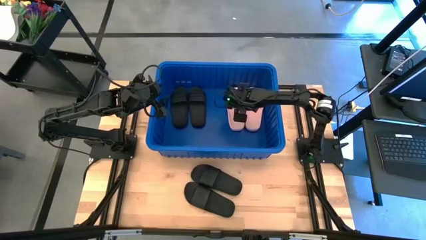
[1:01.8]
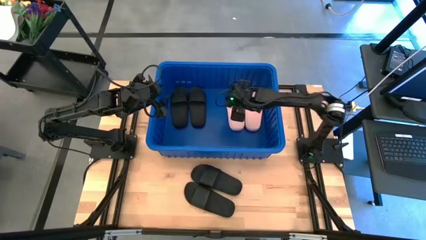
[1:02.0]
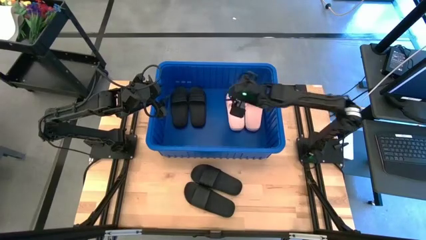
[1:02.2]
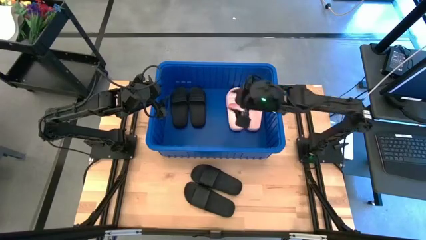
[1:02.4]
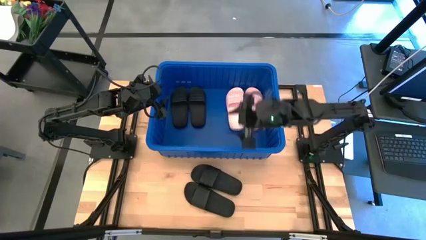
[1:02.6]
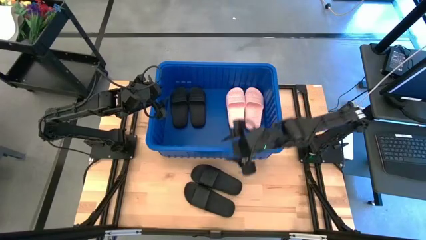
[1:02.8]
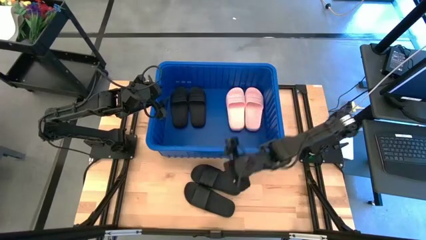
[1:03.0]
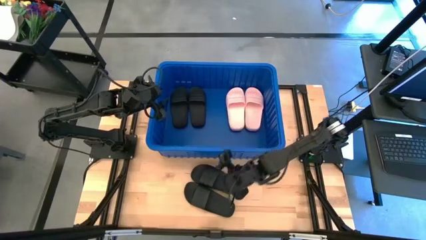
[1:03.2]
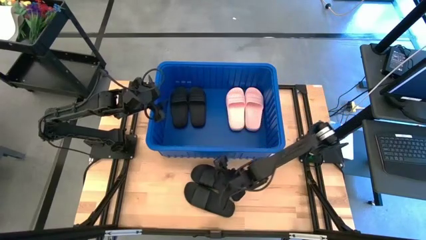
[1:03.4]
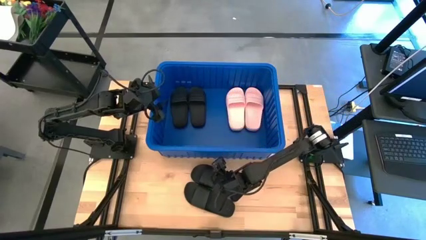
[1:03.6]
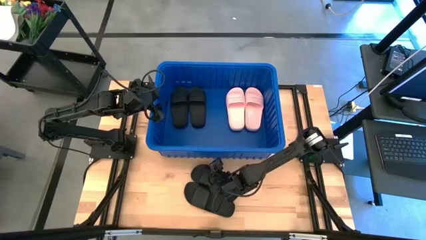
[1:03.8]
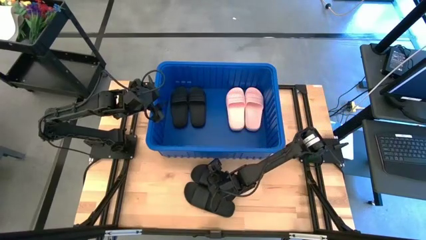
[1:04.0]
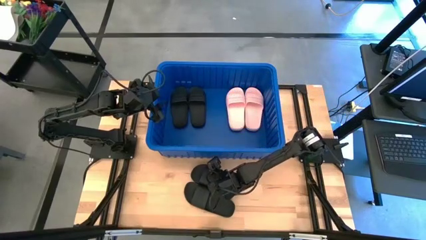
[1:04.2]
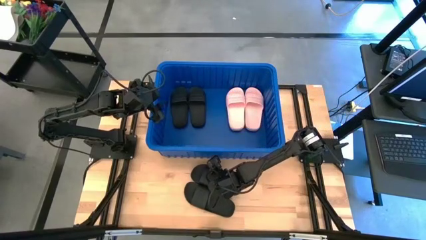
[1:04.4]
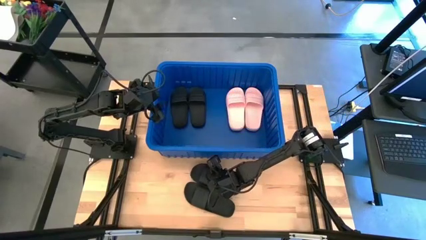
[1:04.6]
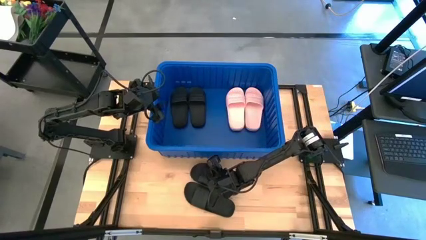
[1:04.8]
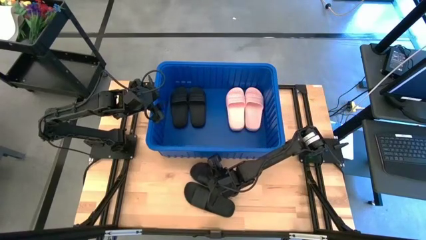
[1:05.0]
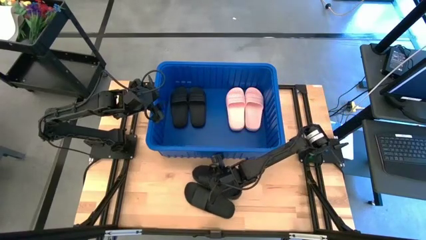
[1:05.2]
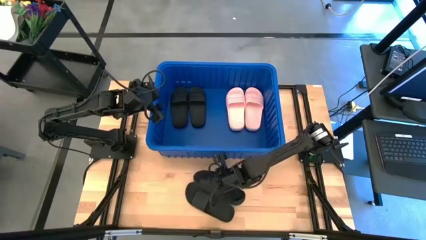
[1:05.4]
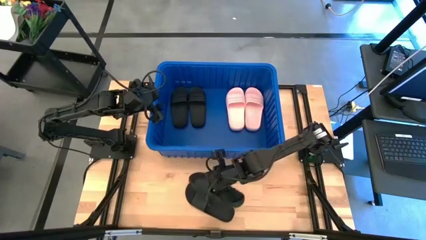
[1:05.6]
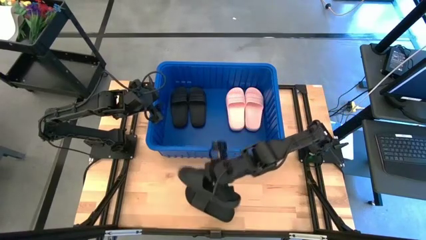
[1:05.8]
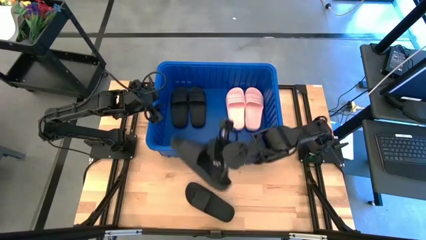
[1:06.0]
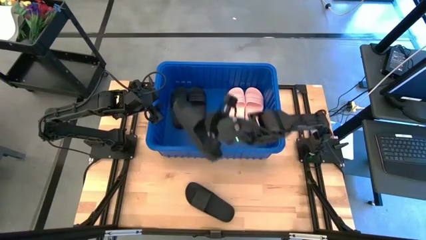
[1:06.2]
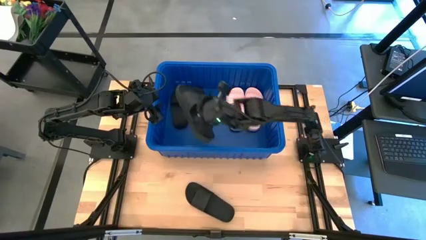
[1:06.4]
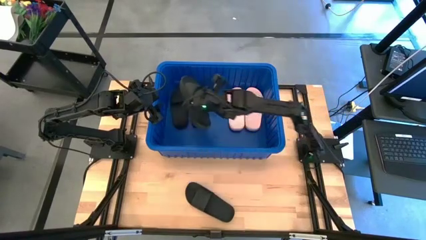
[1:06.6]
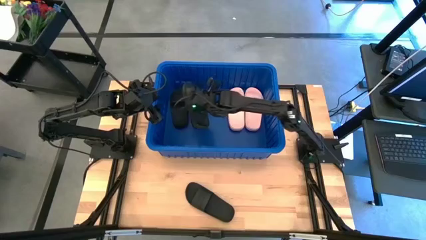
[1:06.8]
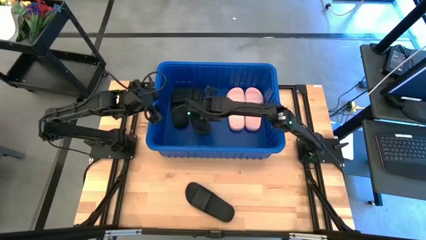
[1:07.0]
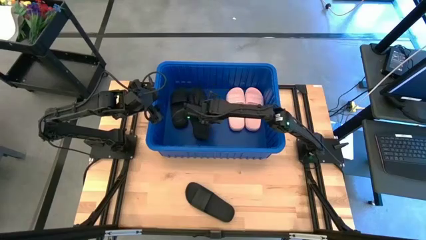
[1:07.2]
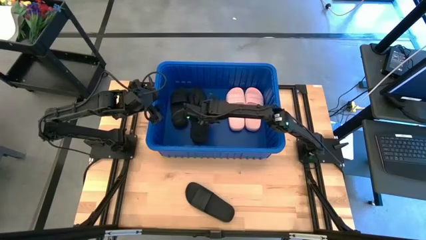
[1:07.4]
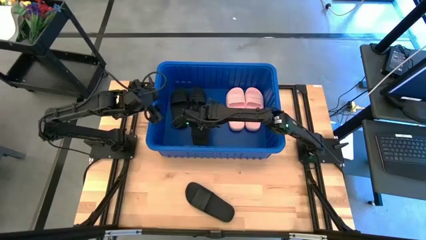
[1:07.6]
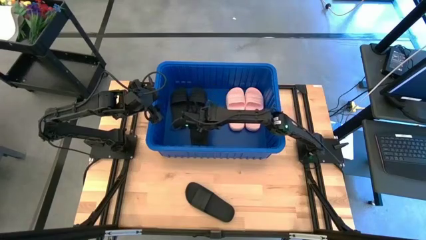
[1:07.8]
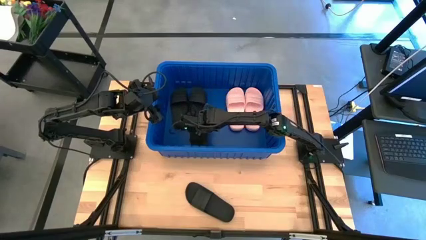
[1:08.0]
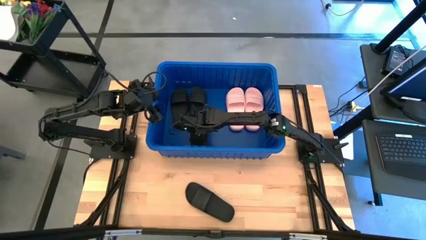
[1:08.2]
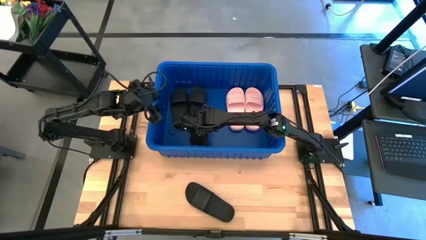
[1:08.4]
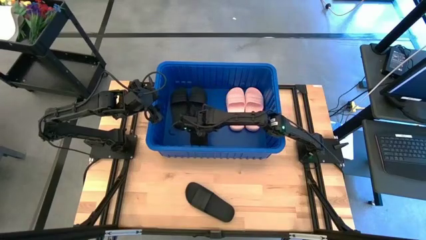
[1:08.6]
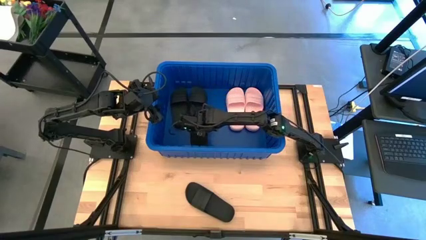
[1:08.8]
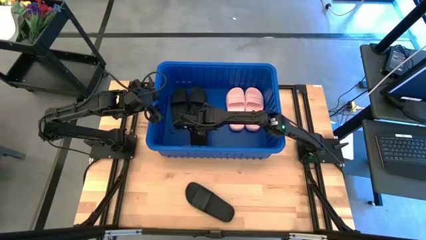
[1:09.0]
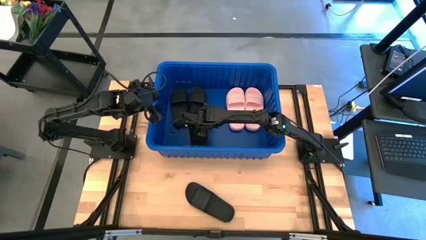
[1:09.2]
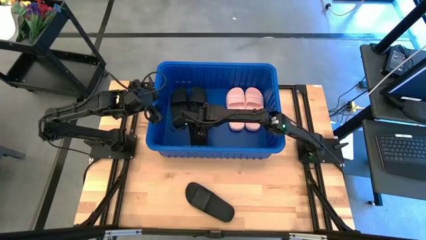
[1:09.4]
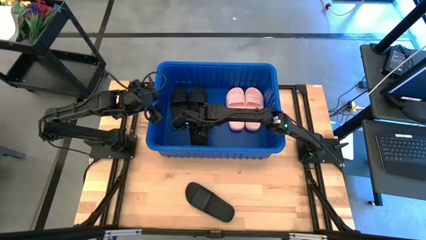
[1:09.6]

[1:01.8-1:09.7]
Task: Pick and place slides into bin
Put the black slide into the blue bin

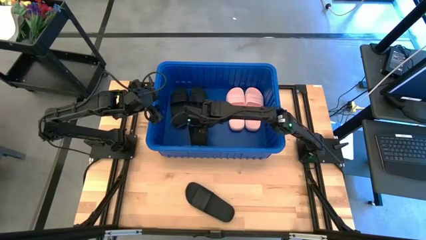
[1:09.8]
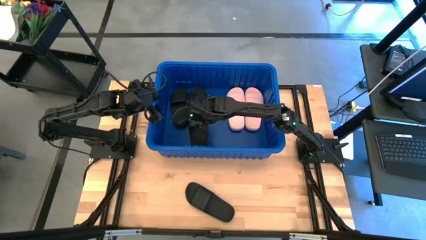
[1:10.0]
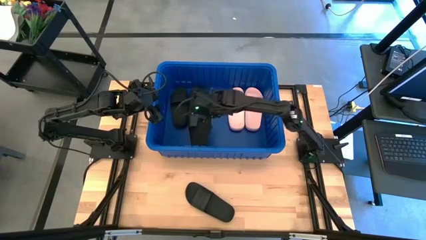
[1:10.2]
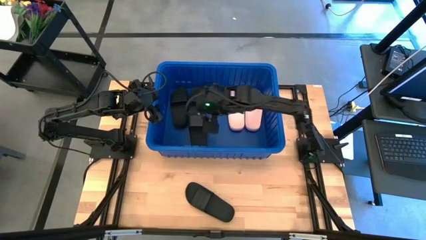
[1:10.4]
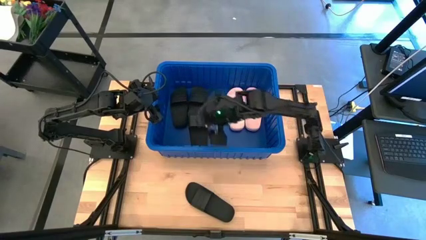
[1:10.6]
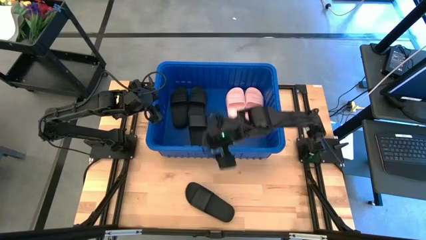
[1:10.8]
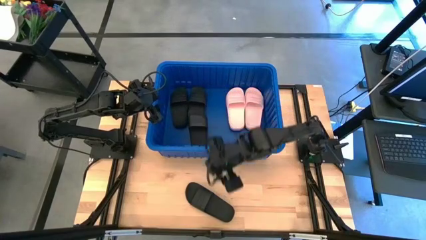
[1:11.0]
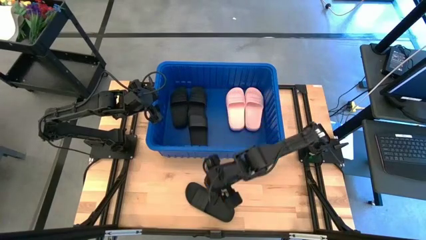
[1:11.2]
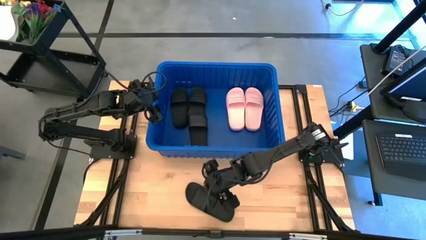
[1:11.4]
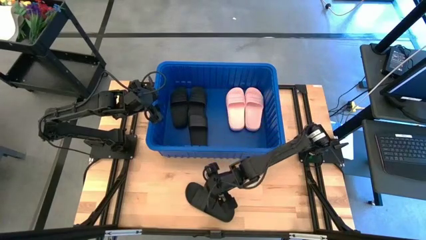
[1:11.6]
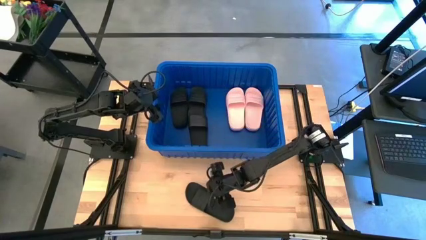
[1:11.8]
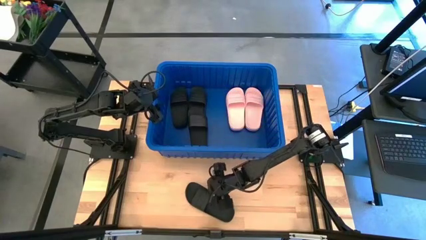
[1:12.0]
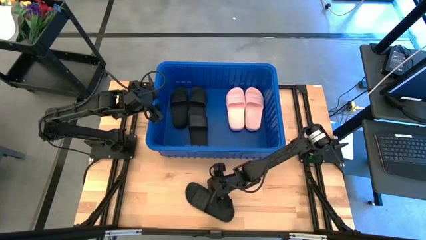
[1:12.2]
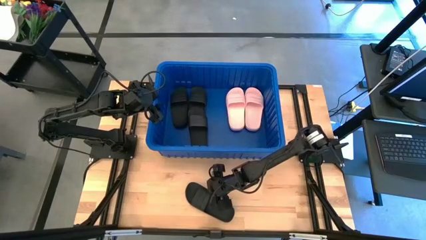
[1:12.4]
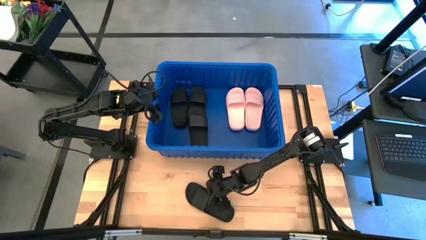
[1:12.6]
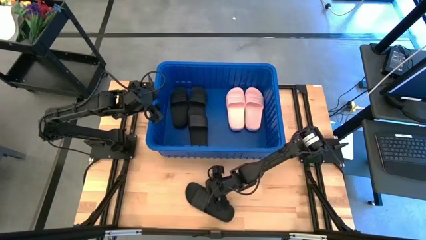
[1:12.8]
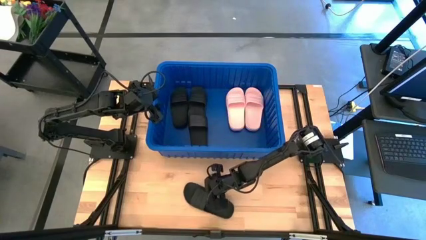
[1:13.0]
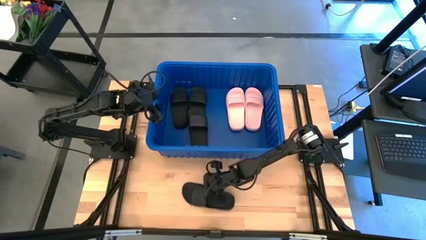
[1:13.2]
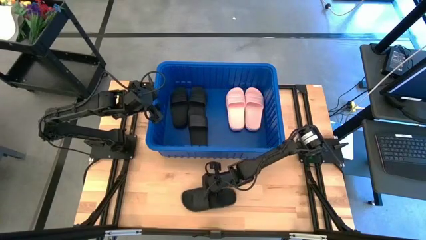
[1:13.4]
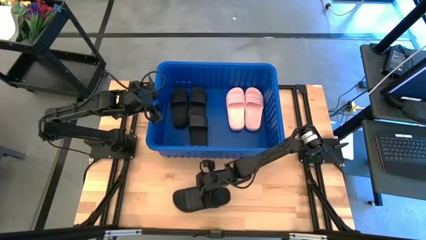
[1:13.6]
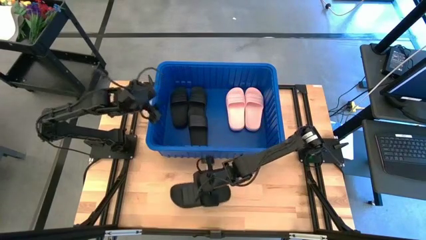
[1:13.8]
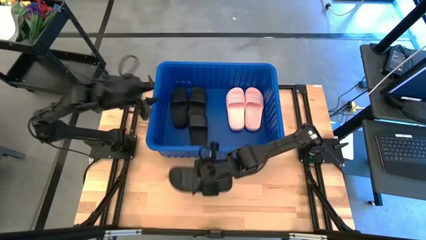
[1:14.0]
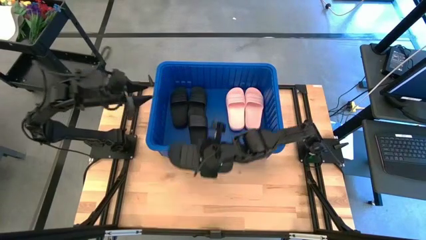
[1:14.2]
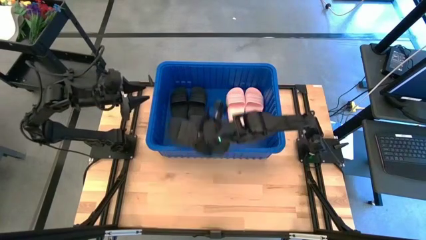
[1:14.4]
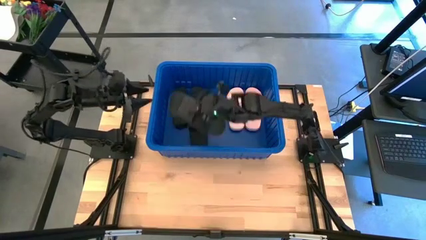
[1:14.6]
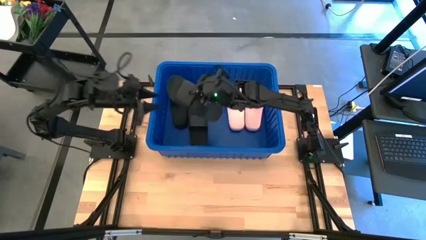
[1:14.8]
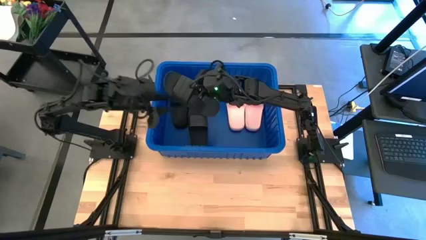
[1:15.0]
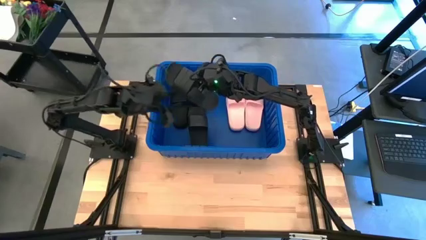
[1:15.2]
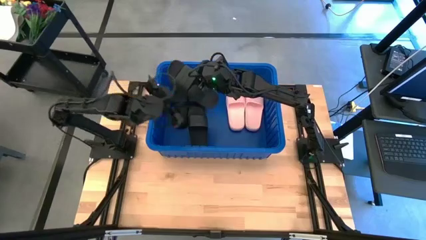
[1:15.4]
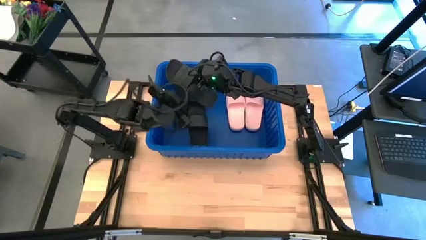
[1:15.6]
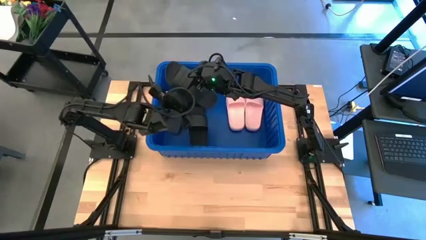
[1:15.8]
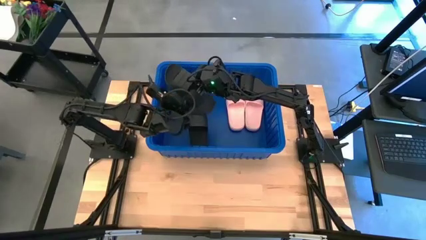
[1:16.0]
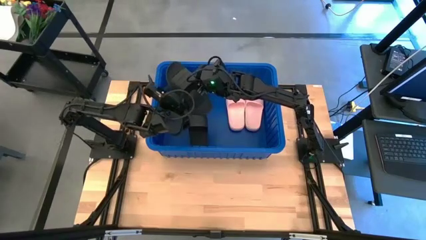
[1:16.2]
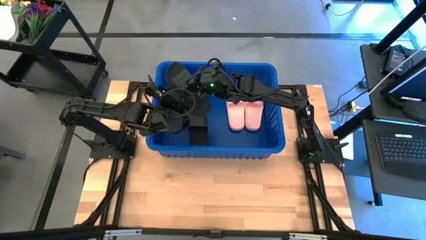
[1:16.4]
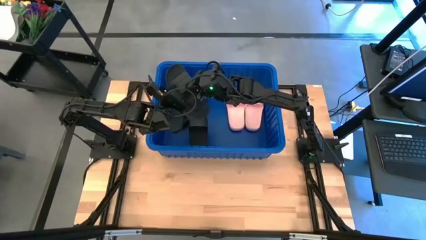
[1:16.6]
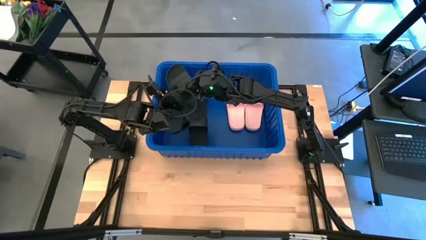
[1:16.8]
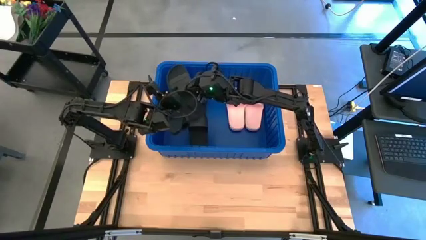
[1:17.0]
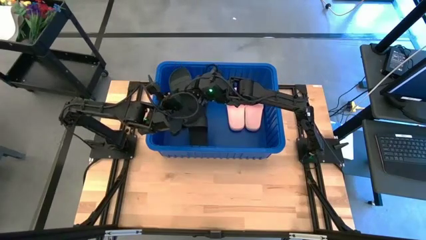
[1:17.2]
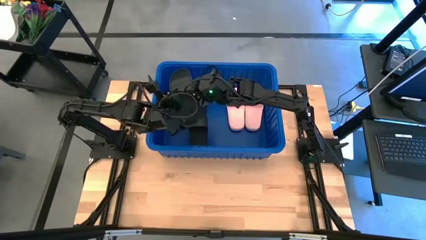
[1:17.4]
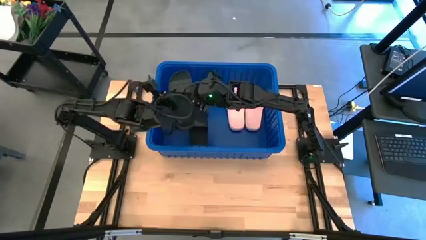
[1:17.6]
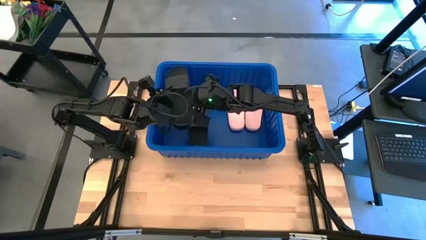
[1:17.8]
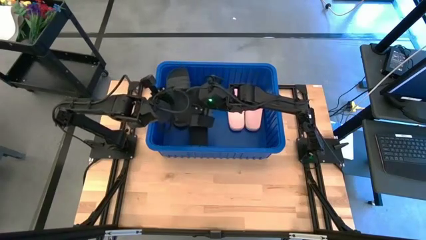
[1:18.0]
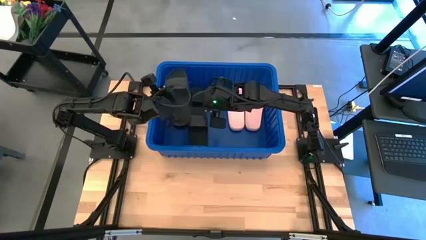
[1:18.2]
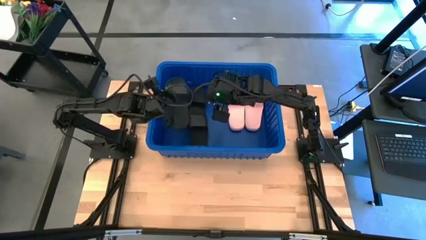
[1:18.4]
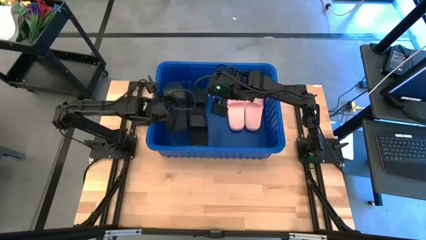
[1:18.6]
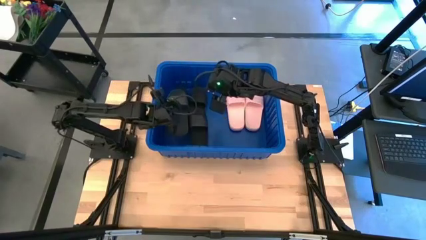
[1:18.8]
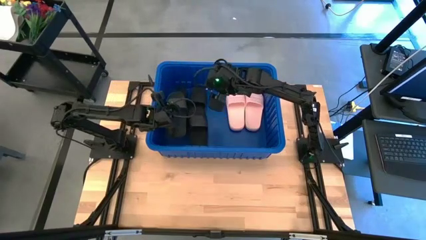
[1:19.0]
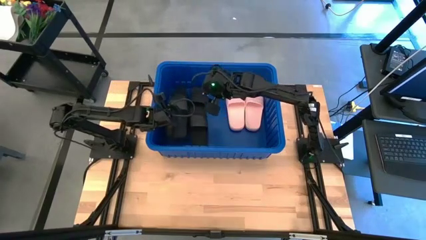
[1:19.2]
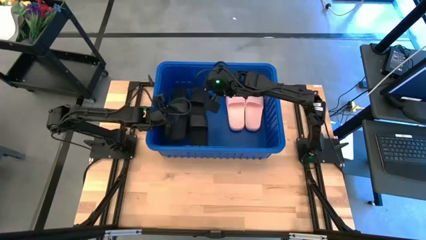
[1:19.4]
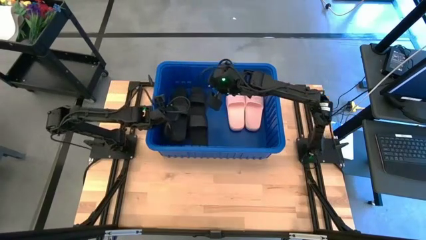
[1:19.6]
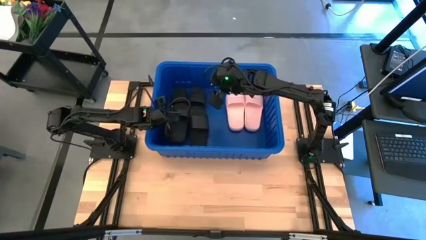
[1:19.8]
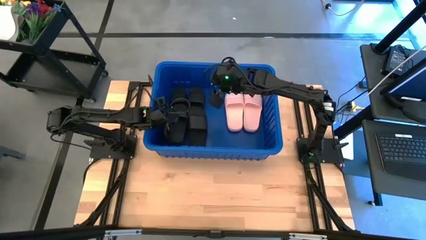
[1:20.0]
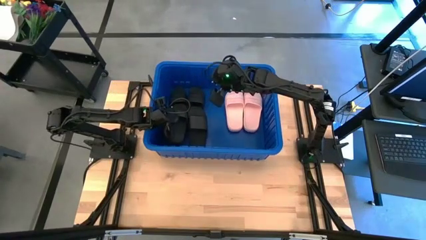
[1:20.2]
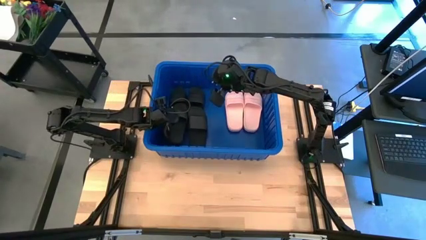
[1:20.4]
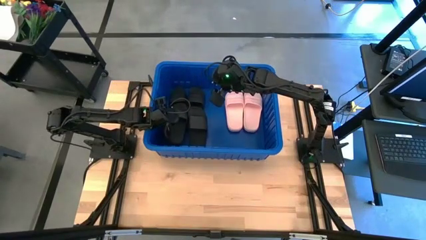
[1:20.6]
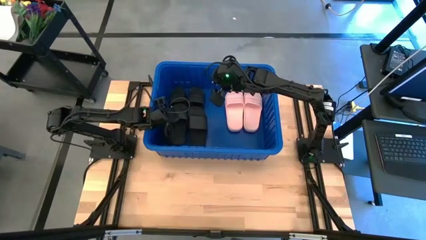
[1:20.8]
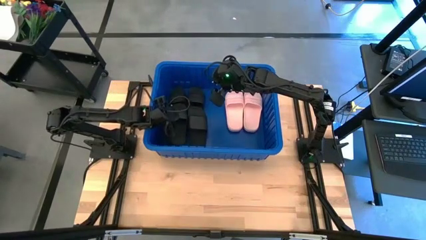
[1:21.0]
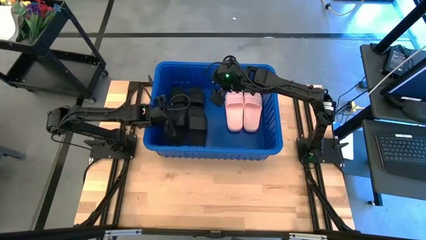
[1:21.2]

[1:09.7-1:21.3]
Put the black slide into the blue bin
